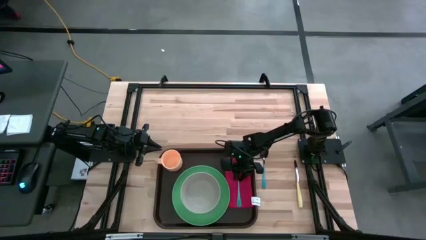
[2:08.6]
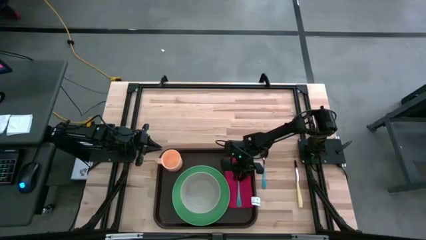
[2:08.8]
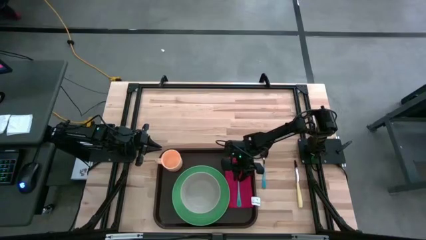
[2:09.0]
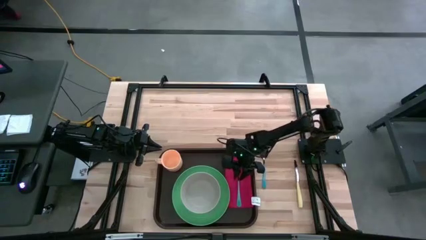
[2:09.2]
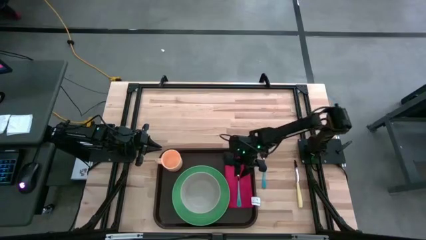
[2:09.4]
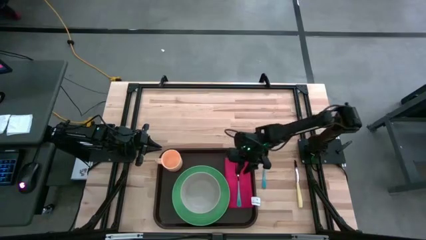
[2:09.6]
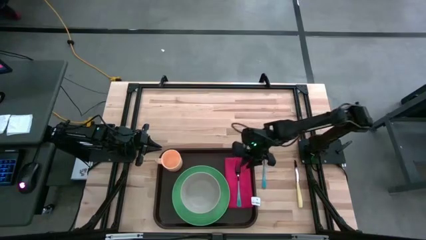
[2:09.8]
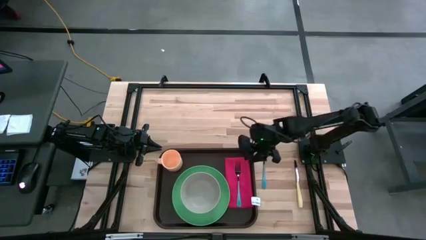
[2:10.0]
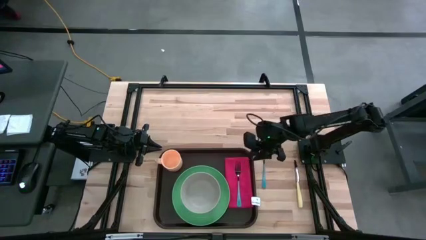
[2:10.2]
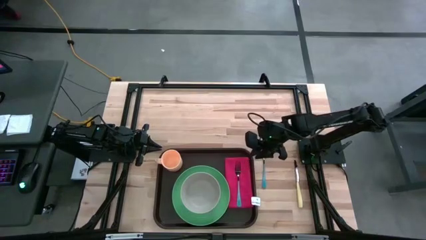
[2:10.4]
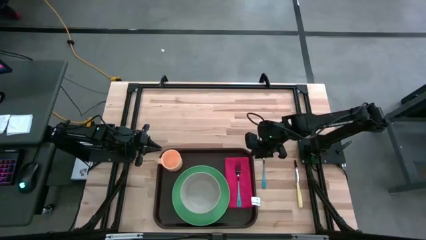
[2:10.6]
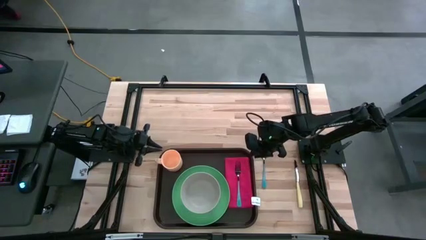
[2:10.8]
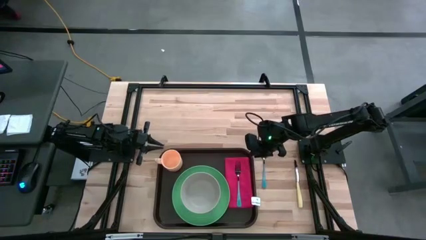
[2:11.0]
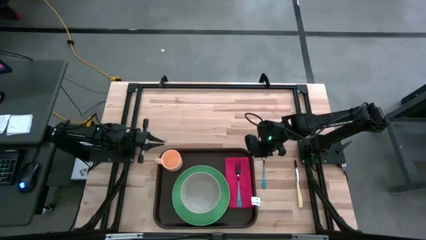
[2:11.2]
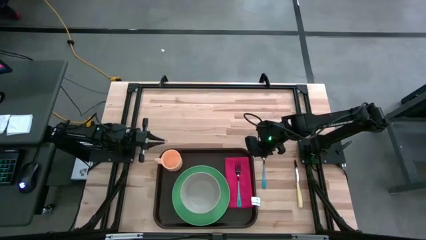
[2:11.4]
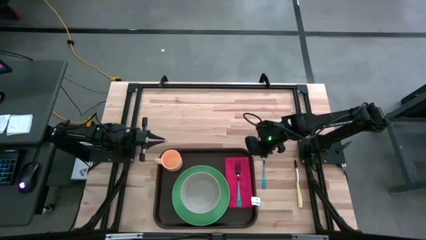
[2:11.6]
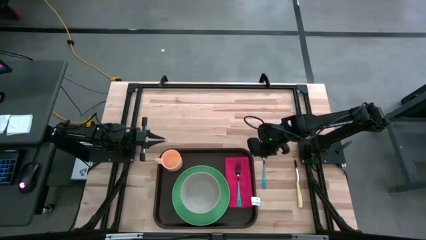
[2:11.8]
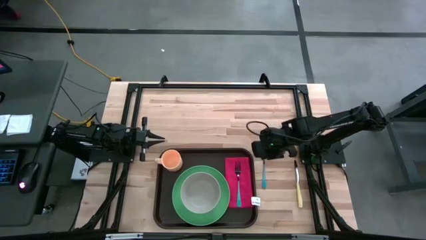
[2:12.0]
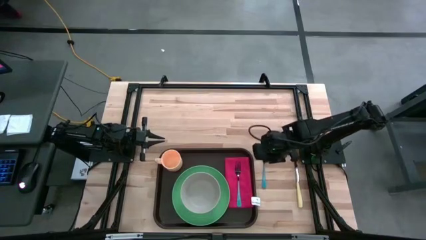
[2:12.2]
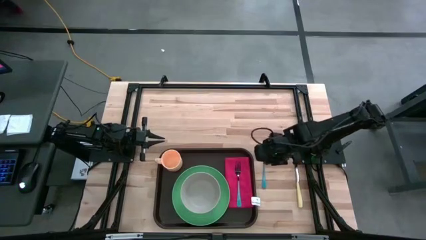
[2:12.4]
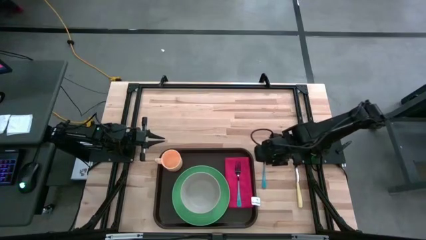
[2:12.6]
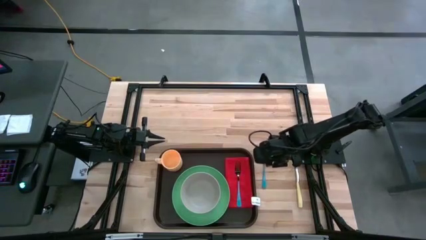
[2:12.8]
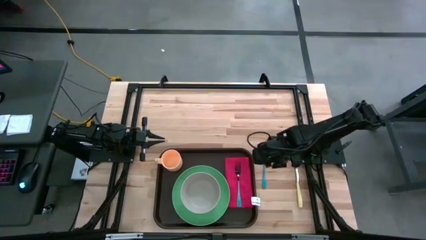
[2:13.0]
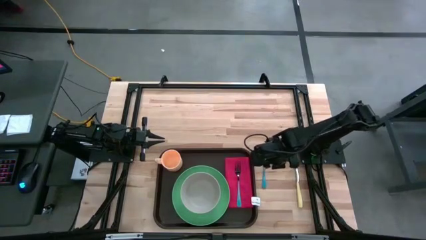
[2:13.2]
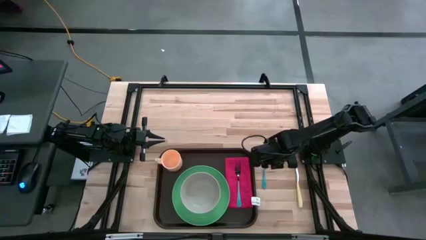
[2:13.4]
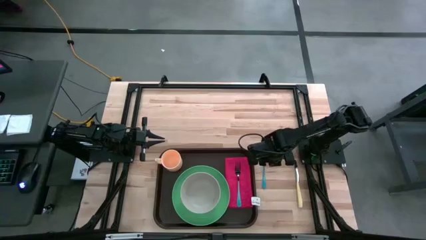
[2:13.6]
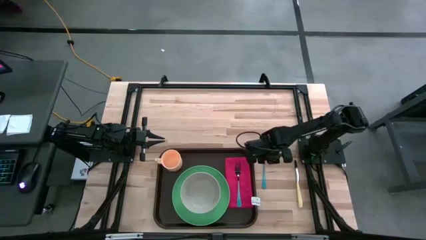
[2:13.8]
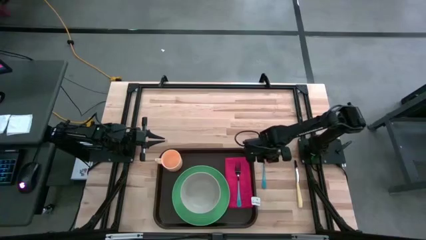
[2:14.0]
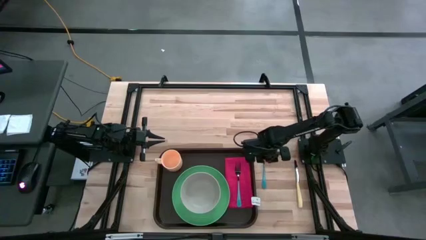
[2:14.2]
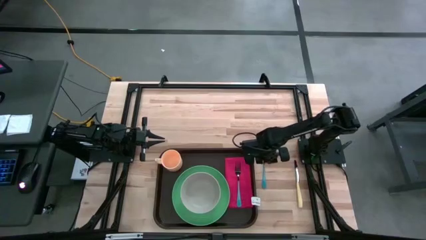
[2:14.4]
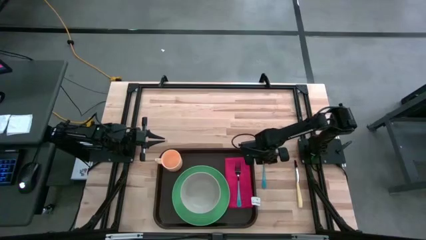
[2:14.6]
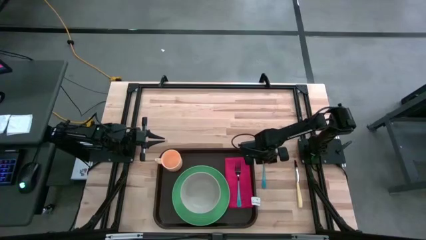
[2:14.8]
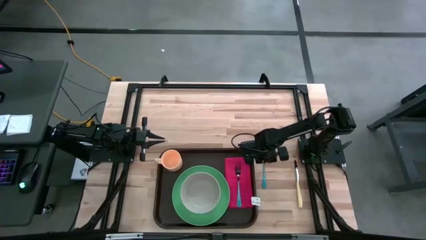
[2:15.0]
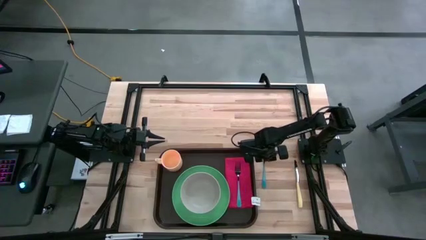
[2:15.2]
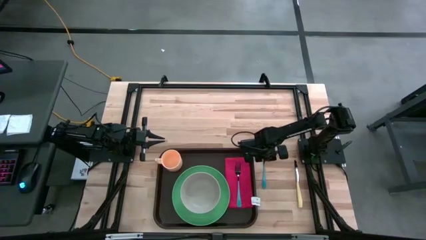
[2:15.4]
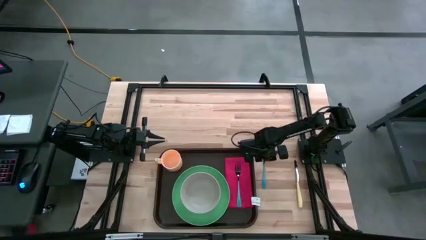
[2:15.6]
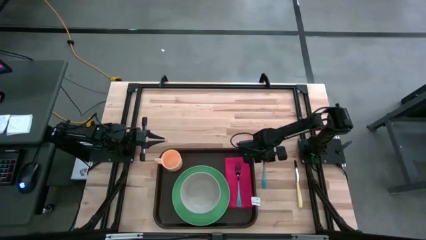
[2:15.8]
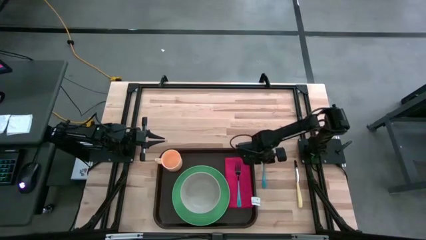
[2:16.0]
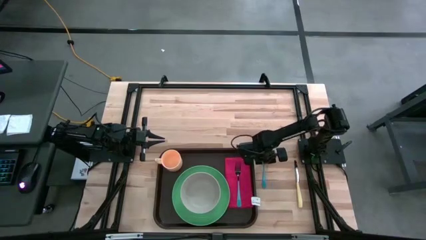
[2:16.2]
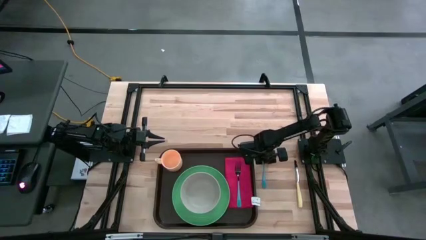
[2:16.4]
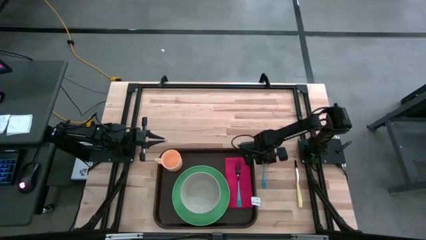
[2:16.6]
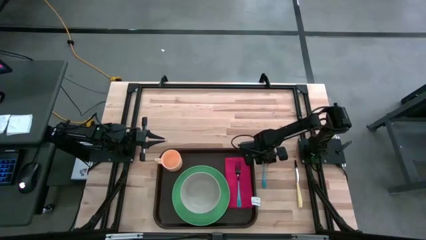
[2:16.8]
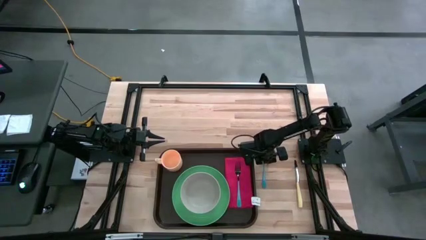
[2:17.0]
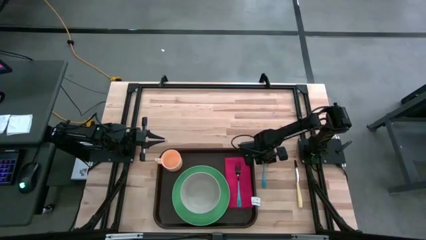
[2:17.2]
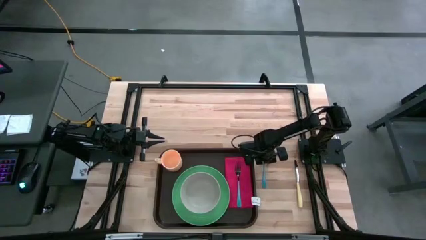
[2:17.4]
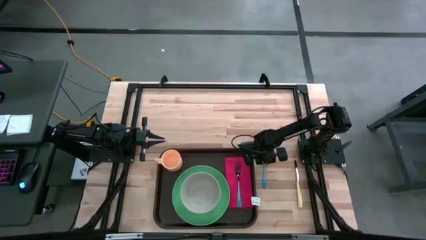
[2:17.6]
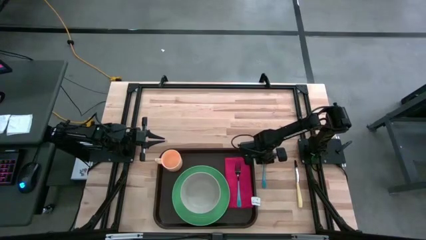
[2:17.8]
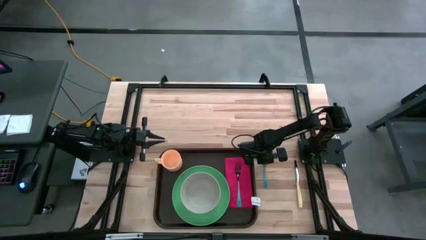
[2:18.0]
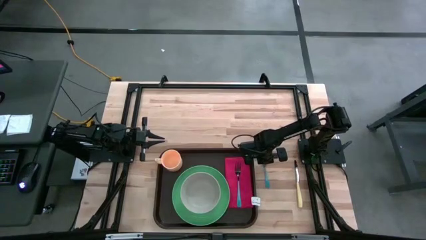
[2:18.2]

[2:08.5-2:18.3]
Task: Set up tray
Put the blue spoon on top of the red table napkin in between of the green plate and blue fork

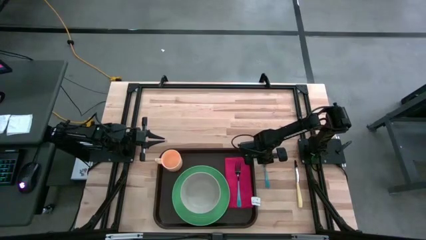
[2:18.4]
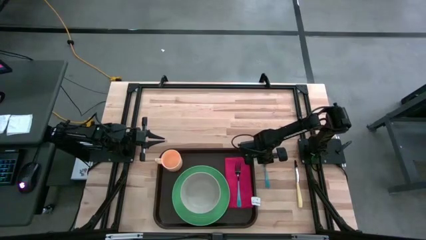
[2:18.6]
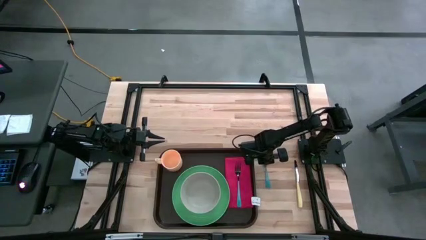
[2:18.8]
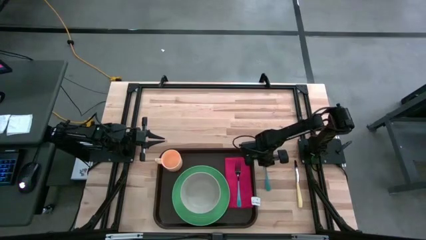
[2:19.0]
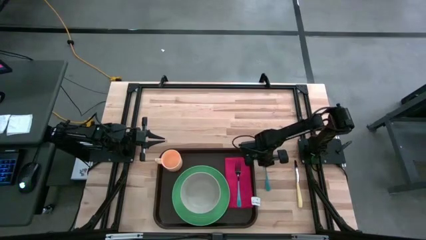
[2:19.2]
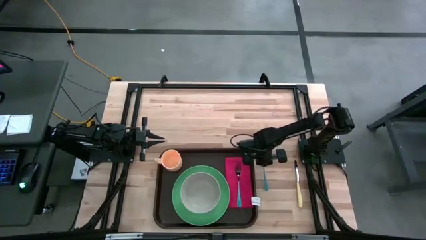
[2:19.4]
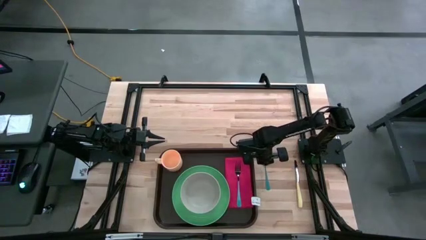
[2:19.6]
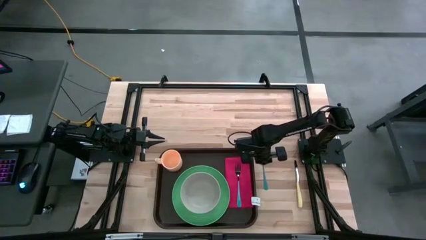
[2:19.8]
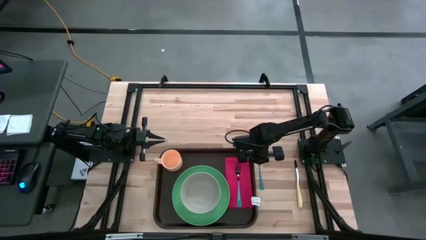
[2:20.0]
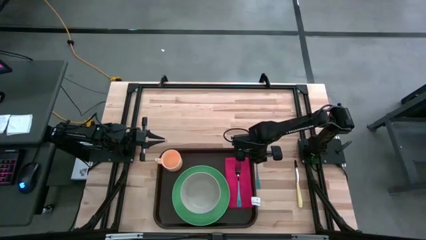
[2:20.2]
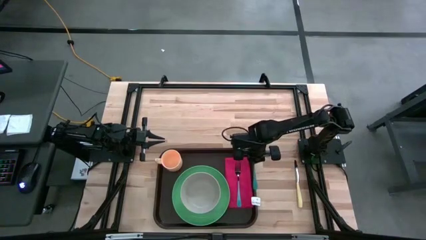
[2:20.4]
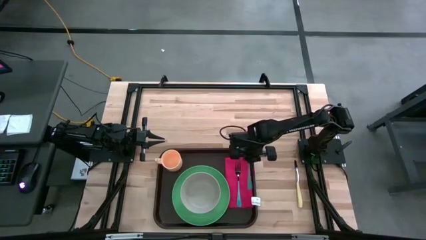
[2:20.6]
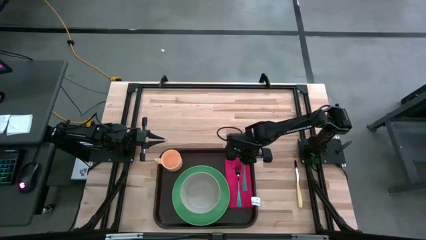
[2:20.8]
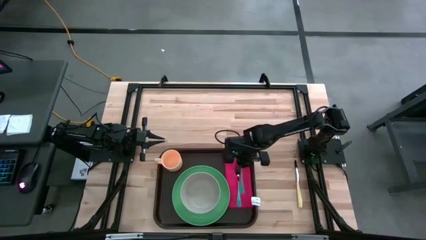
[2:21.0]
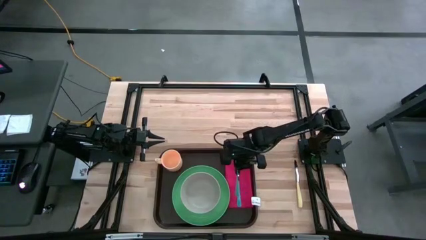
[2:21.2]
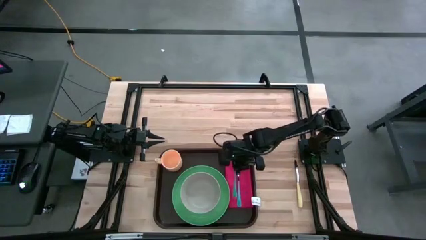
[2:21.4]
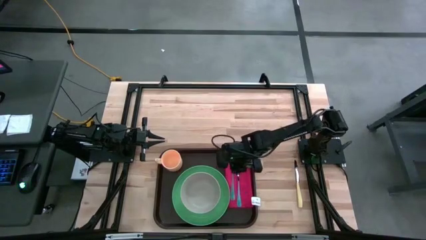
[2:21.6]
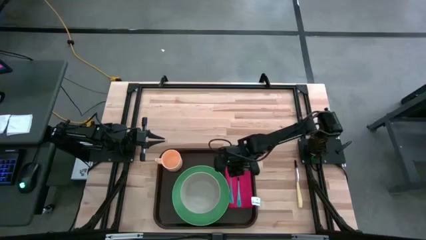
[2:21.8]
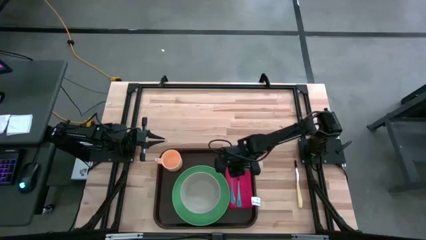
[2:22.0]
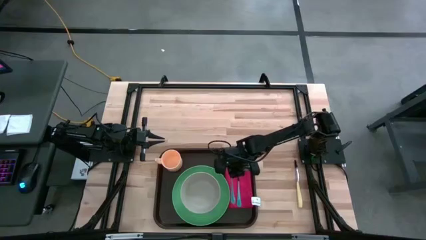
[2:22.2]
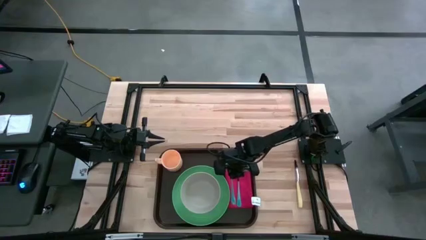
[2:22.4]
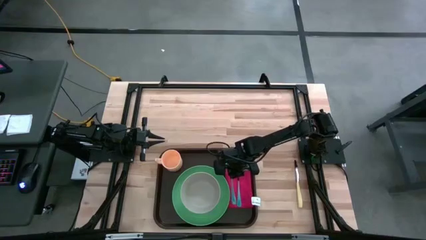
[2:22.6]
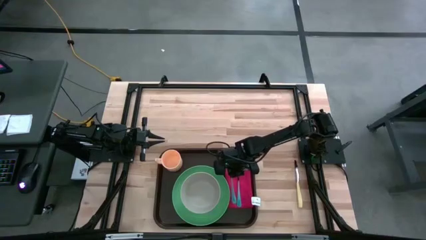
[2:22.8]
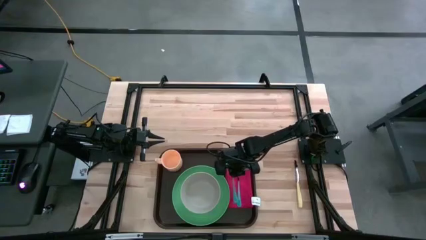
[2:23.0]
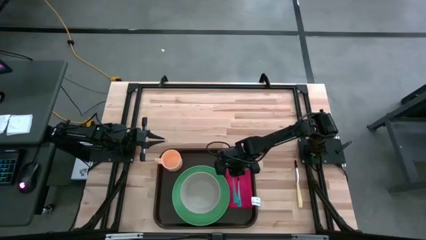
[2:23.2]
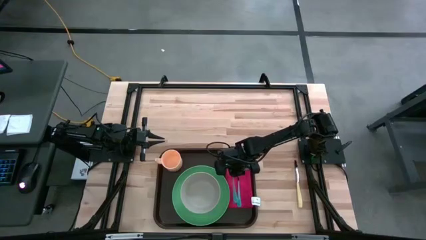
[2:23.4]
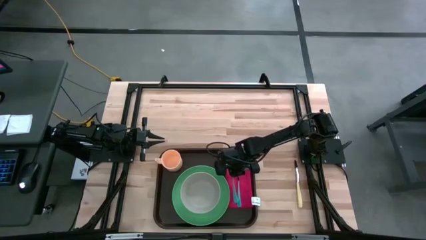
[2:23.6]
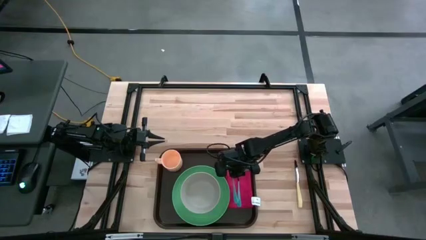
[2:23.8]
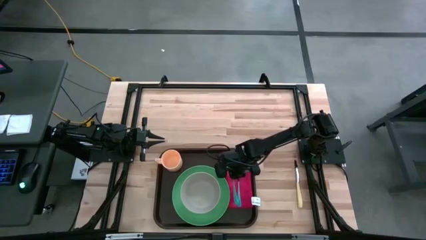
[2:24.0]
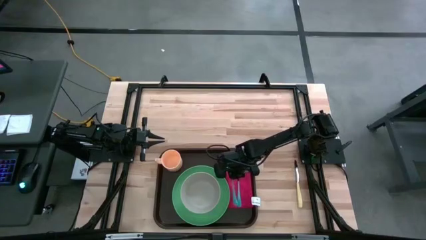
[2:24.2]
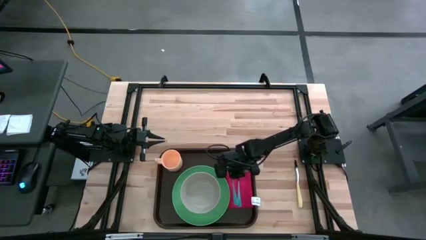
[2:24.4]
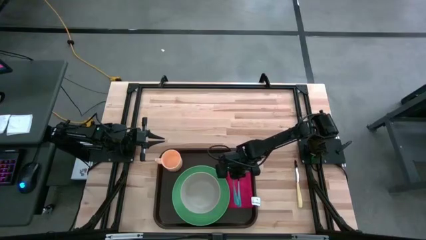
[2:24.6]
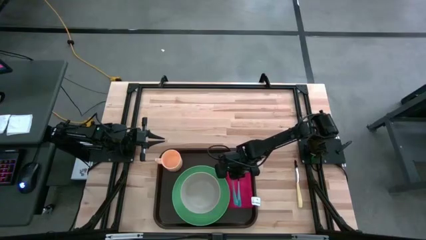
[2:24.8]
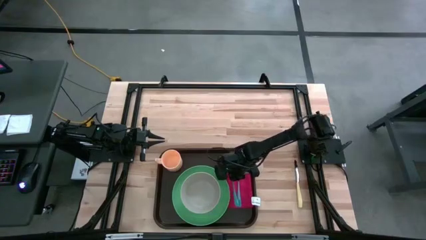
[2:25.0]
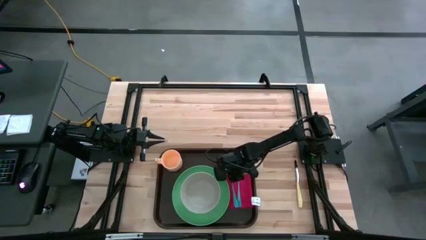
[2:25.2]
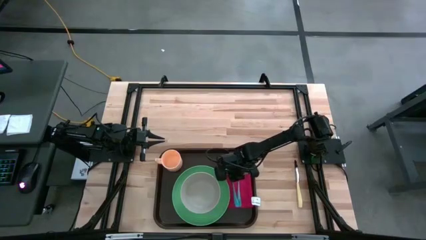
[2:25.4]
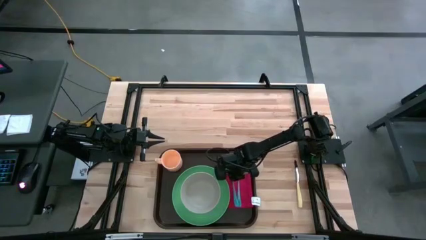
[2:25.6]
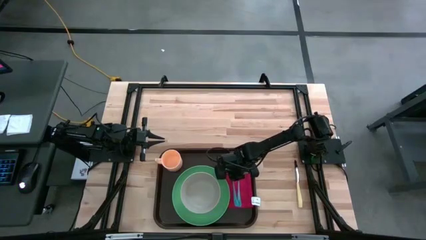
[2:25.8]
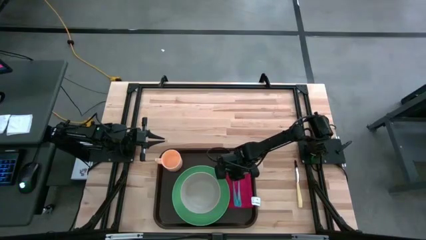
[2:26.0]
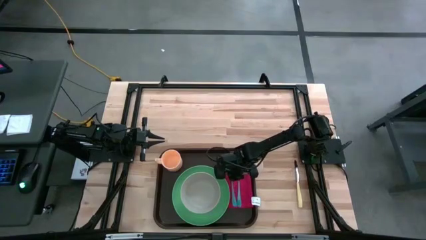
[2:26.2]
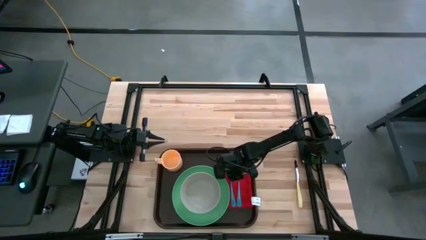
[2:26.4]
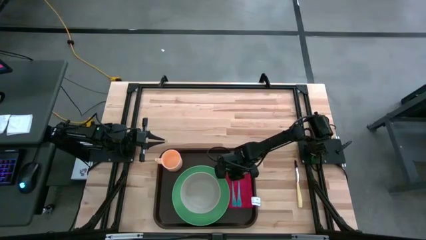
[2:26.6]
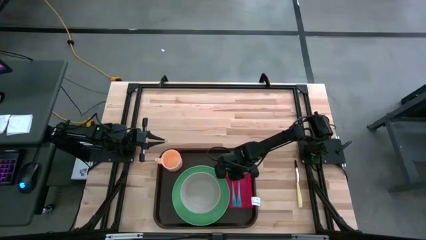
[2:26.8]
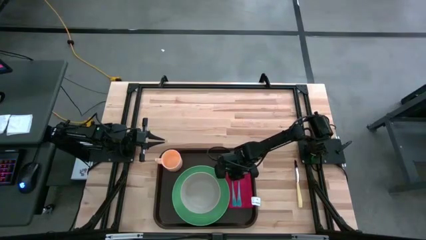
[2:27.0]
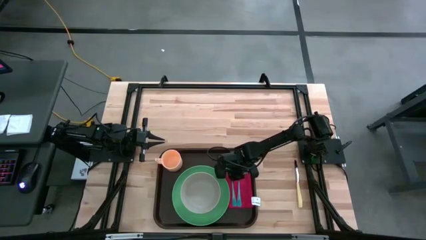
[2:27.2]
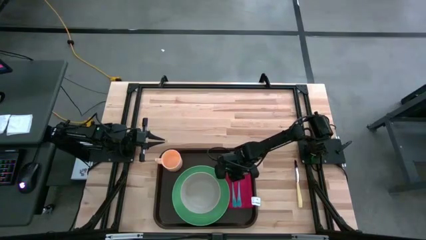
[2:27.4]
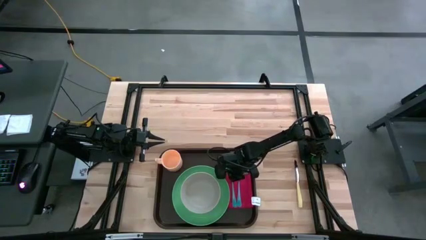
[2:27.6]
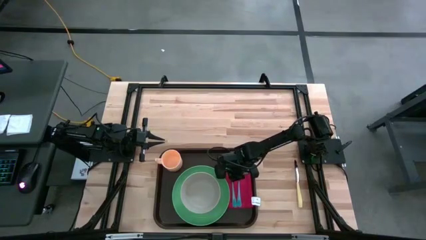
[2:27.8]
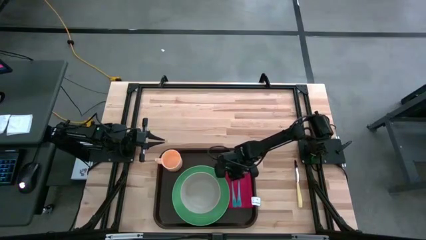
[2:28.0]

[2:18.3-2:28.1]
Put the blue spoon on top of the red table napkin in between of the green plate and blue fork
